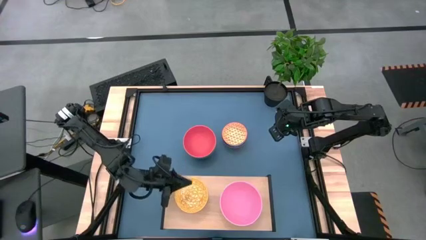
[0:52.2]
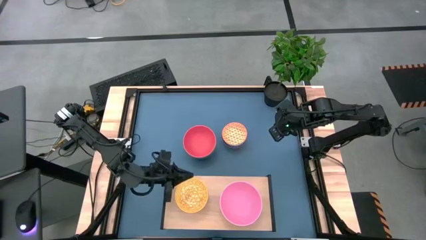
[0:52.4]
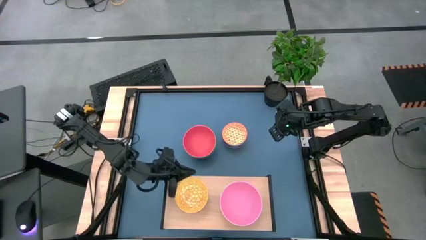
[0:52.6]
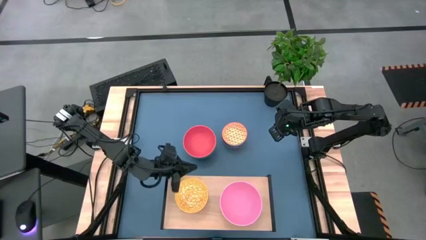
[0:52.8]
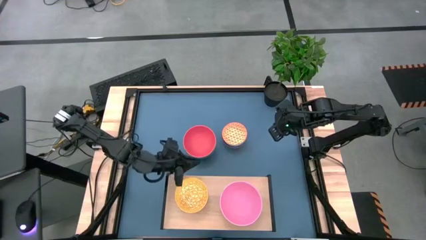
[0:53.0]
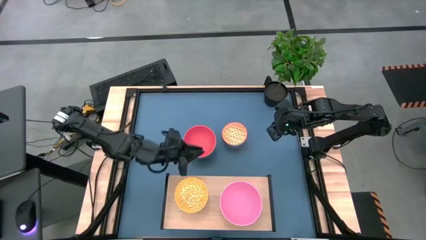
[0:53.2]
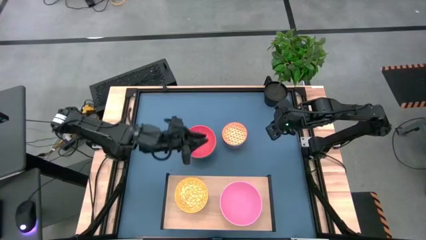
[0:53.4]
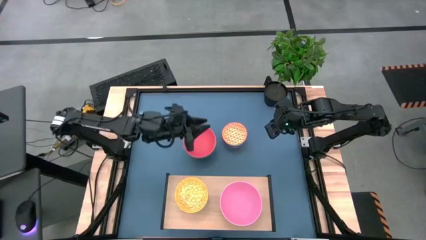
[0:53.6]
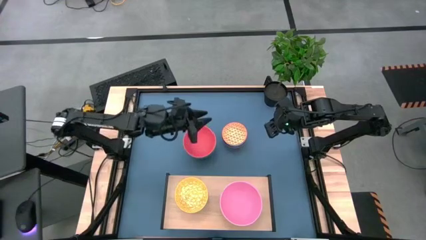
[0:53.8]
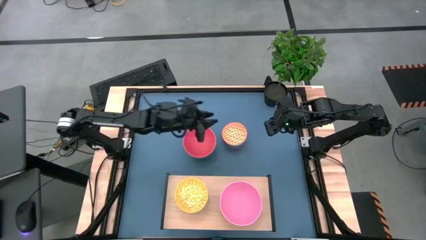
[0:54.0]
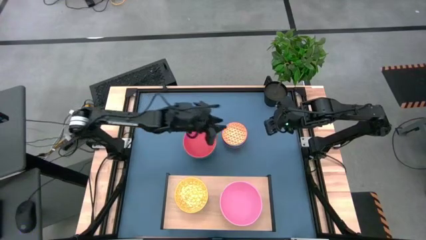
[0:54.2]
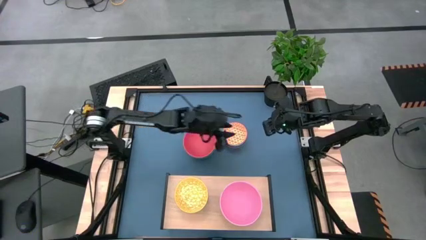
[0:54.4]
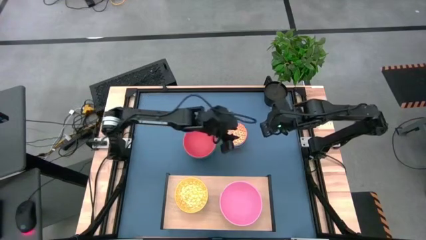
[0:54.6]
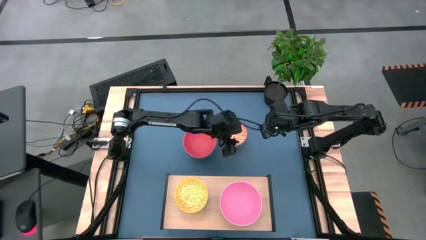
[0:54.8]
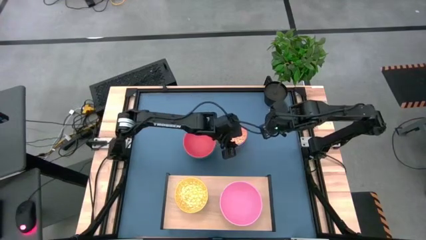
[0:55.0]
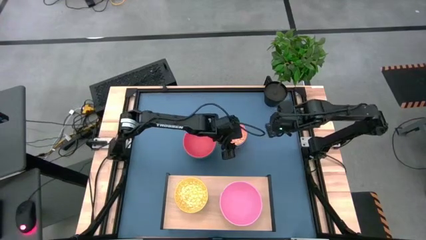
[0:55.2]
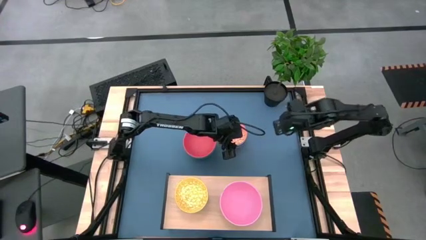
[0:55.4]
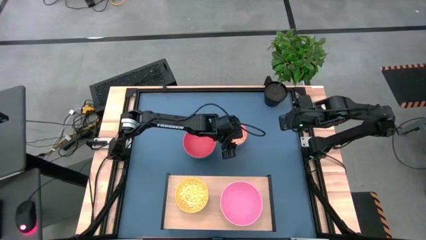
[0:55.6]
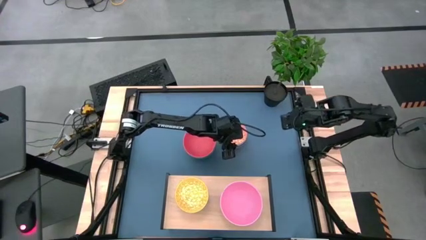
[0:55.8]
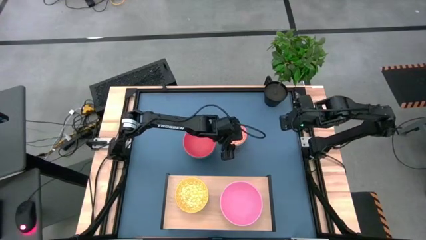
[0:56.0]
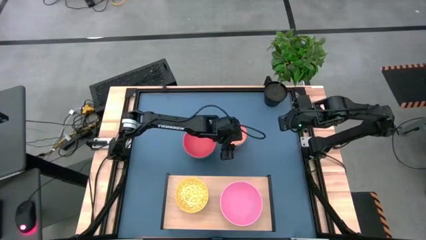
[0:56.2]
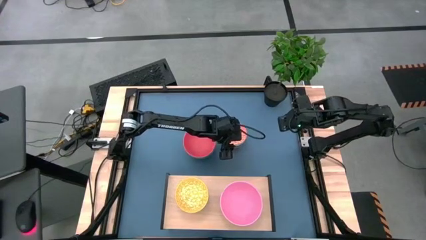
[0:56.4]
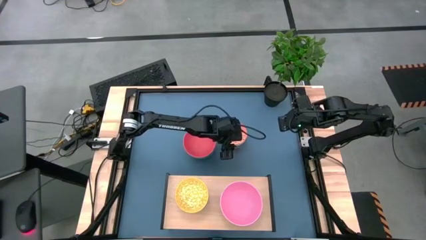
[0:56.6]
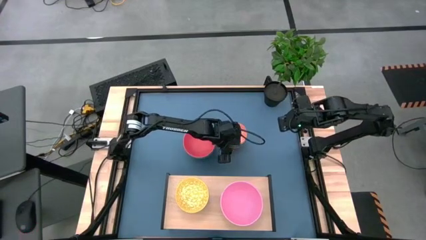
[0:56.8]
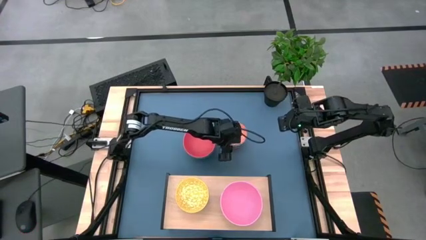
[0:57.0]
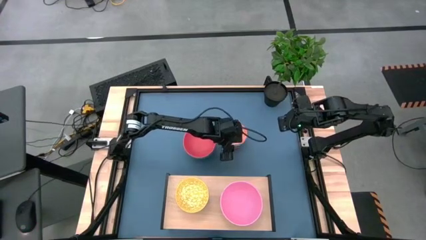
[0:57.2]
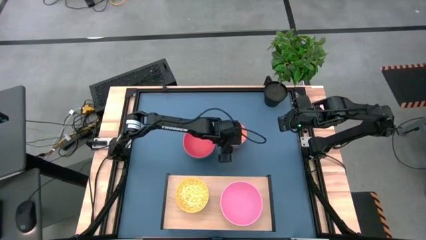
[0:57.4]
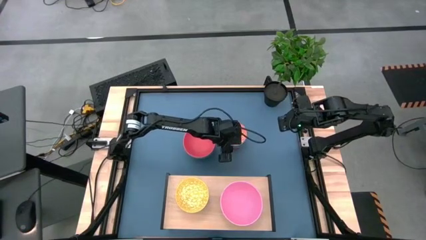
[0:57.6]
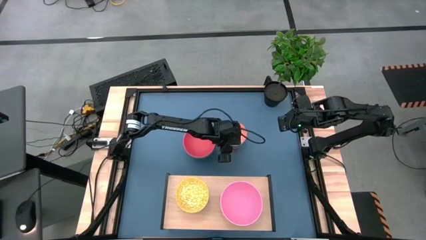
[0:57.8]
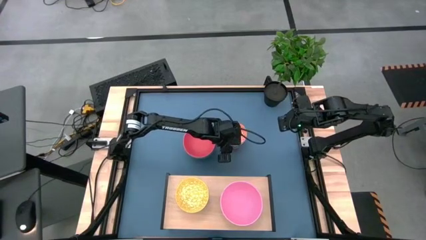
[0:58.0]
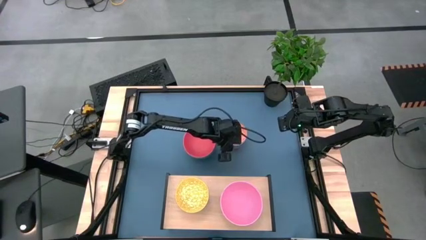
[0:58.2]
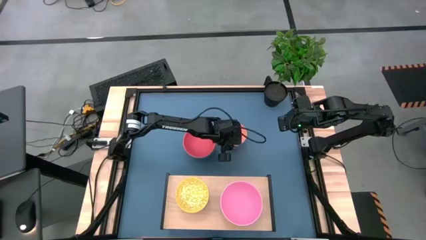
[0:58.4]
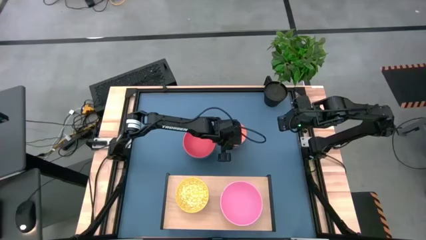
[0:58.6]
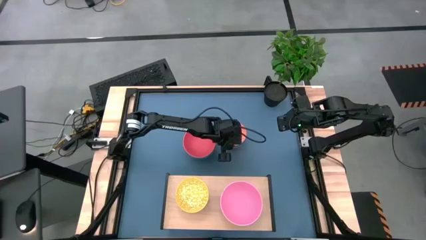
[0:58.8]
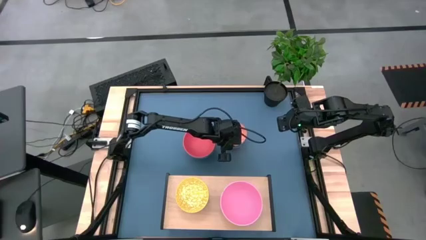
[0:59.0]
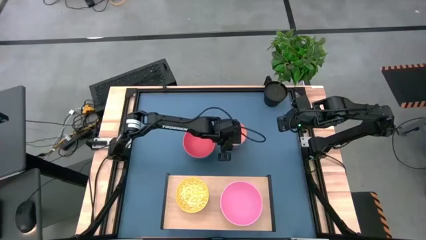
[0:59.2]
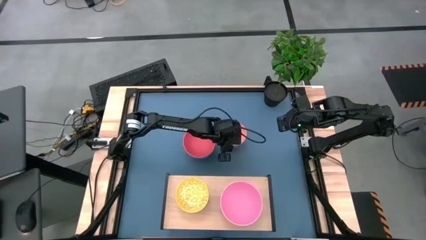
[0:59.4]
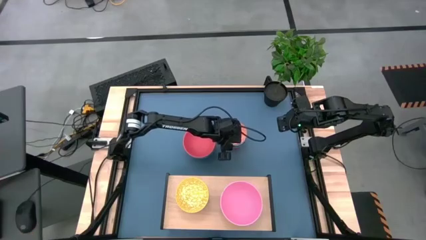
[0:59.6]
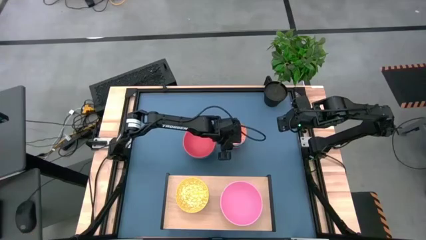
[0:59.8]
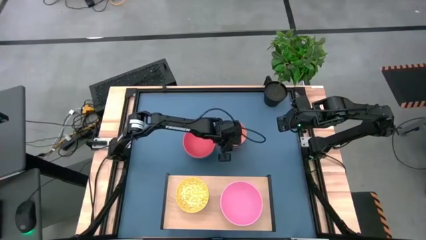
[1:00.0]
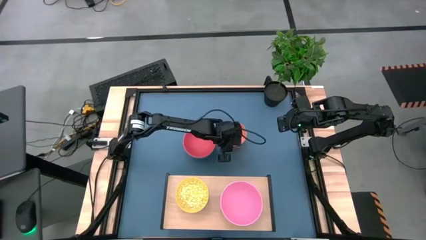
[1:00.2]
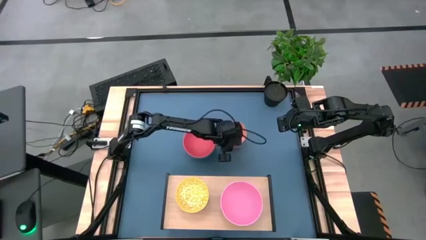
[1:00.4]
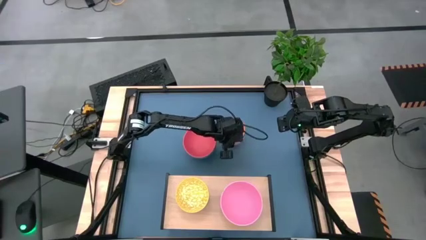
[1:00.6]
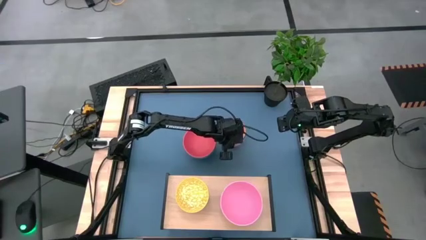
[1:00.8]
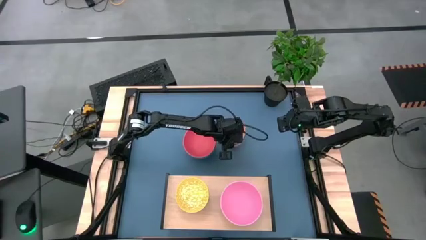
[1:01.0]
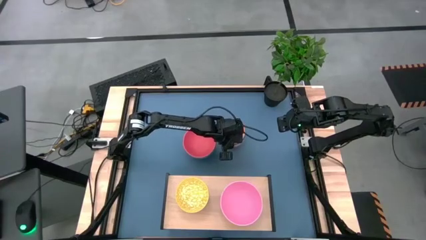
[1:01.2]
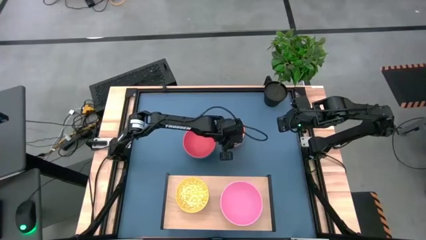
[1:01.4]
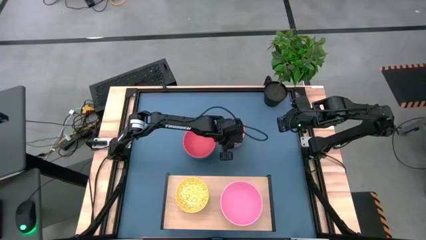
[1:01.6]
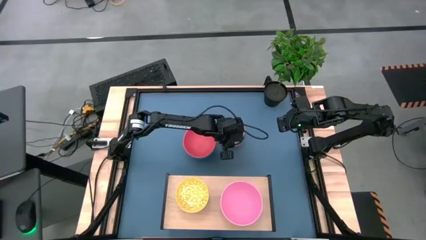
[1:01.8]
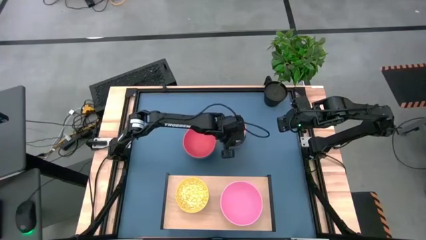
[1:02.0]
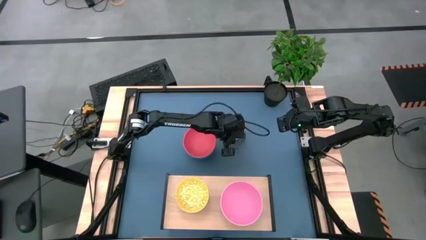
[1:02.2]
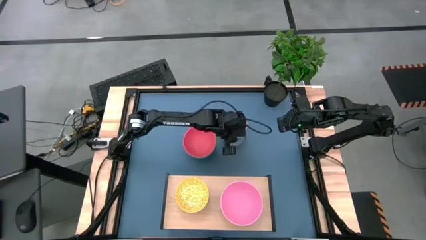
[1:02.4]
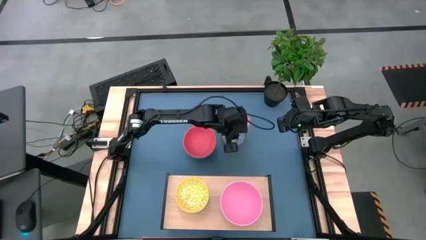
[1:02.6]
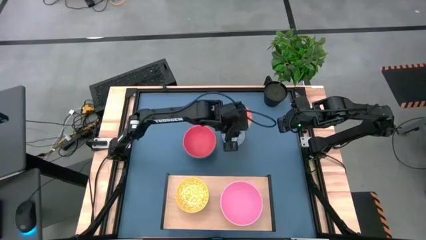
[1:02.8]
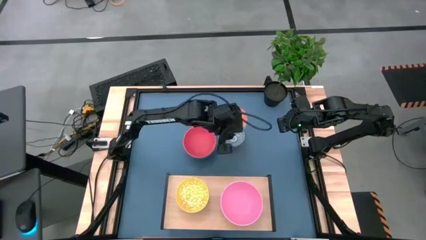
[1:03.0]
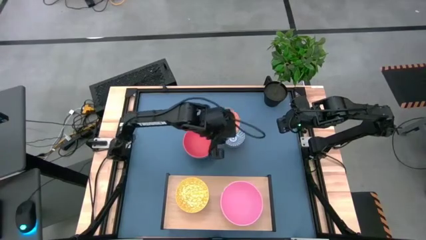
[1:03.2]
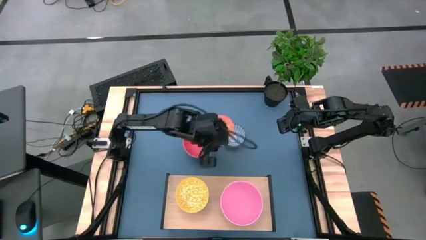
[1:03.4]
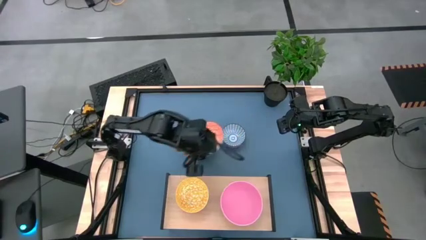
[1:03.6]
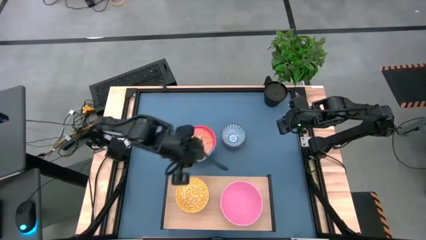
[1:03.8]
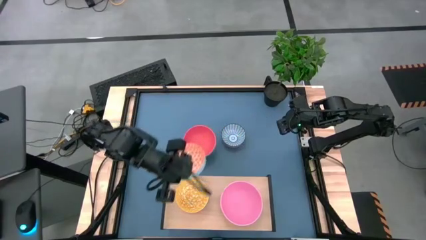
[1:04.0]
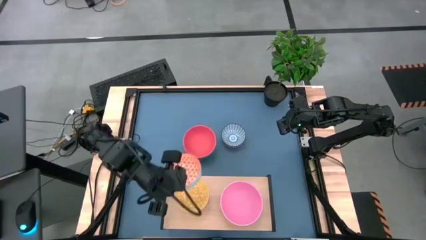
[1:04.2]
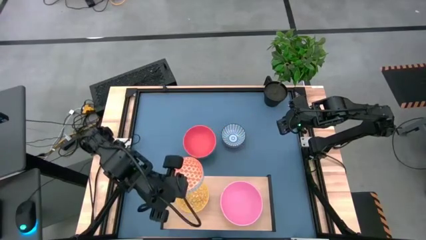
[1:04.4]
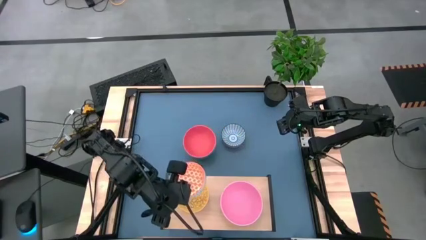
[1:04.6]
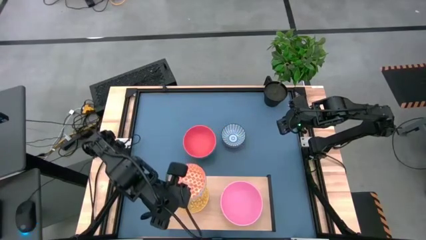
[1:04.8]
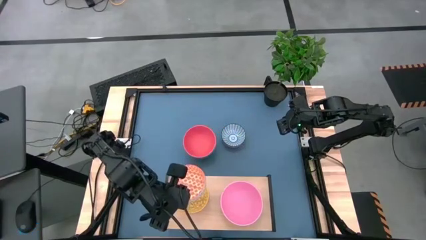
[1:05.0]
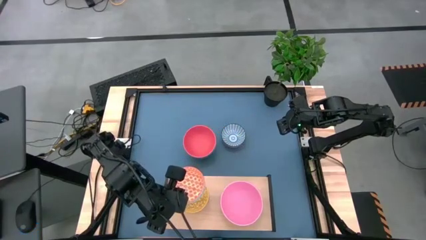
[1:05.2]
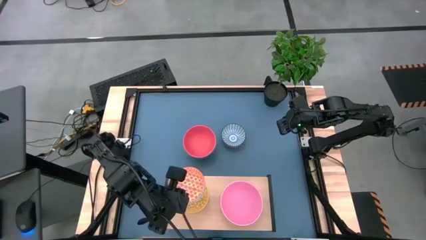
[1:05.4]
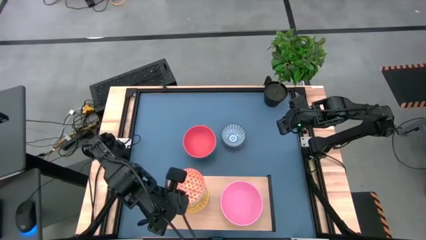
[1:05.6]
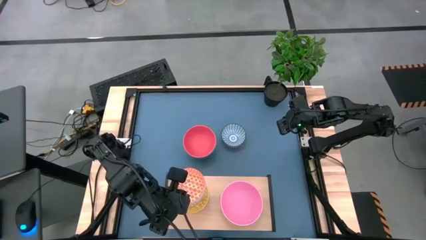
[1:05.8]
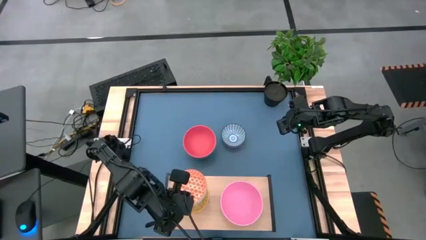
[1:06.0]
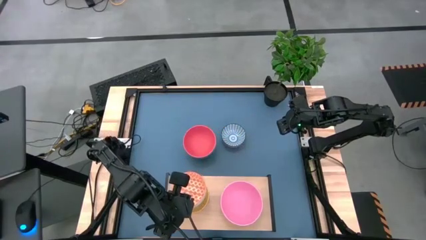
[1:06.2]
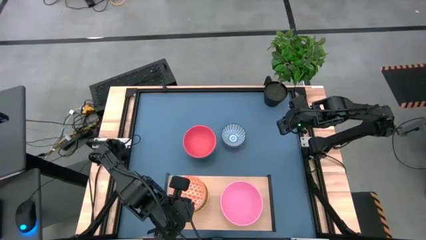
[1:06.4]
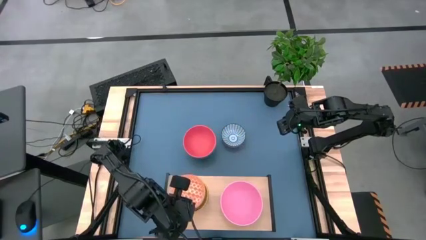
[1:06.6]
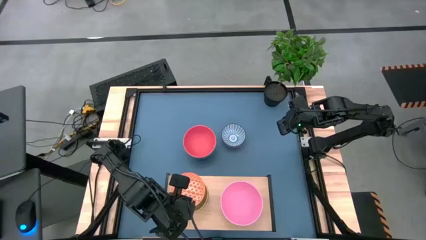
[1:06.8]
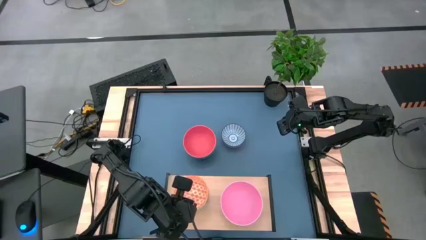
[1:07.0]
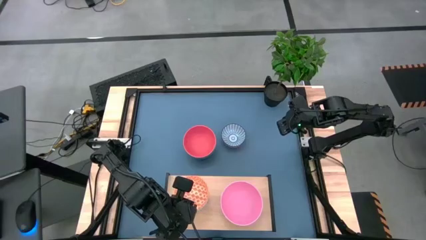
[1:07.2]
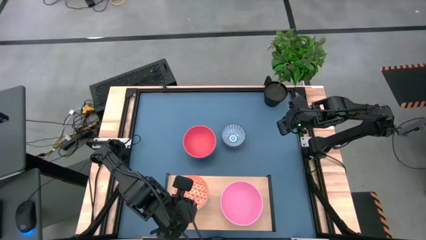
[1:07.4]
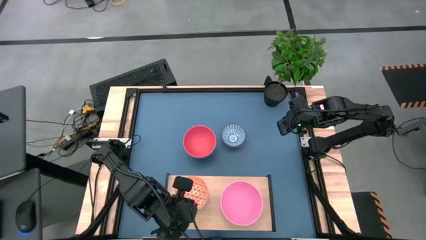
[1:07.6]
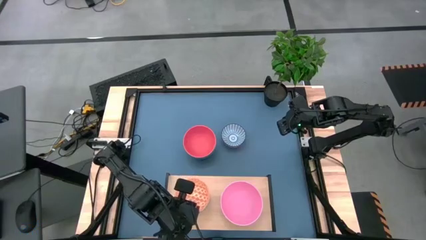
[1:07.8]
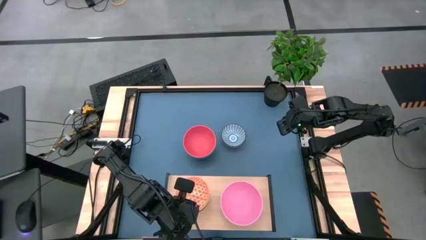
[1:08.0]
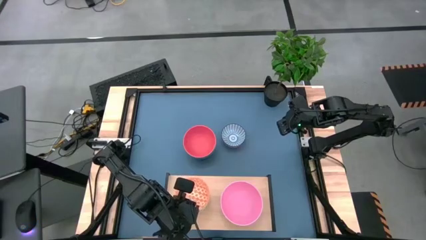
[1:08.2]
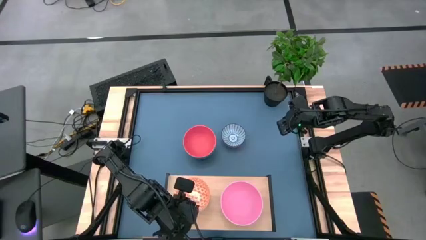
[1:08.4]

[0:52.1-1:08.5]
Task: Place and stack bowls onto a shelf
Stack the orange patterned bowl on top of the yellow bowl on the shelf
